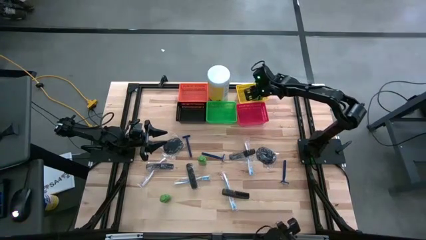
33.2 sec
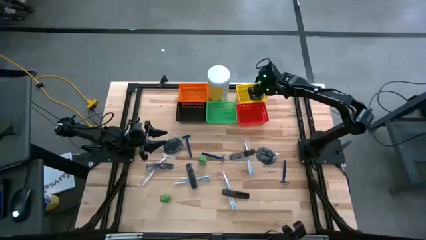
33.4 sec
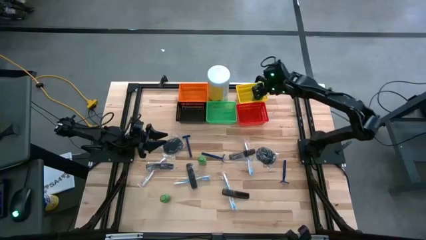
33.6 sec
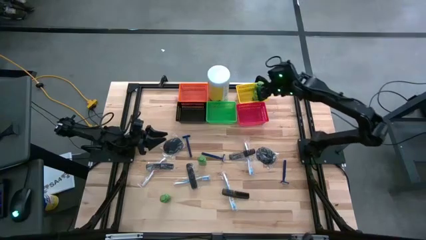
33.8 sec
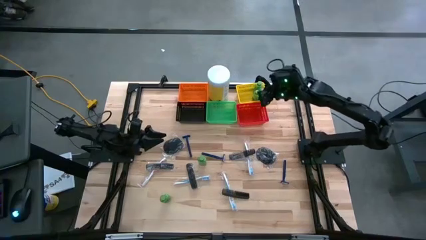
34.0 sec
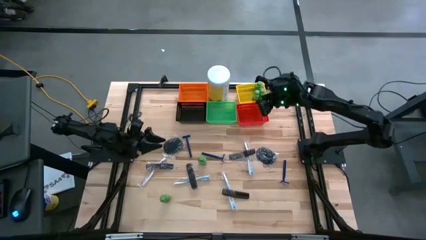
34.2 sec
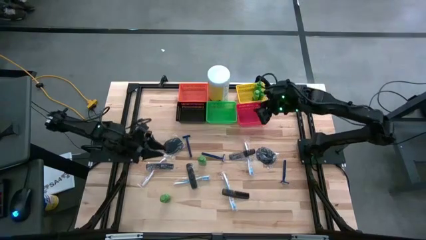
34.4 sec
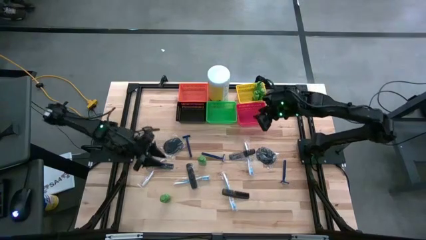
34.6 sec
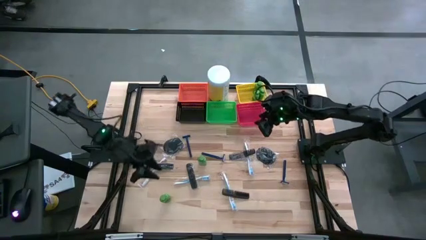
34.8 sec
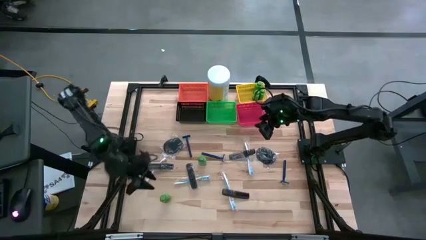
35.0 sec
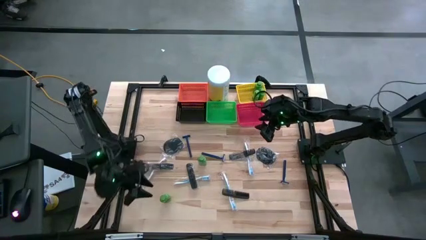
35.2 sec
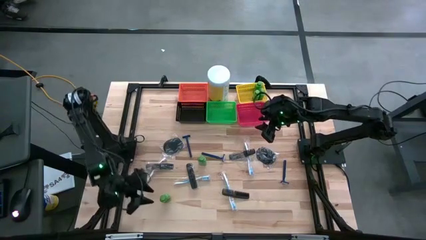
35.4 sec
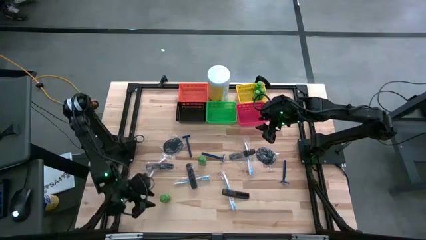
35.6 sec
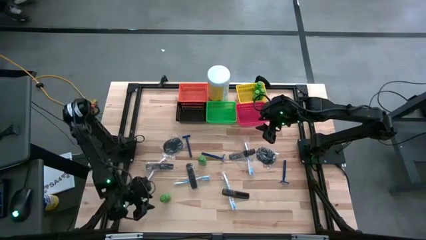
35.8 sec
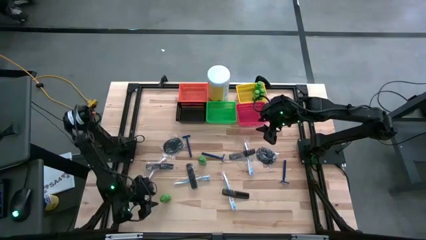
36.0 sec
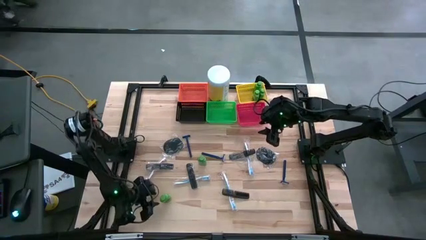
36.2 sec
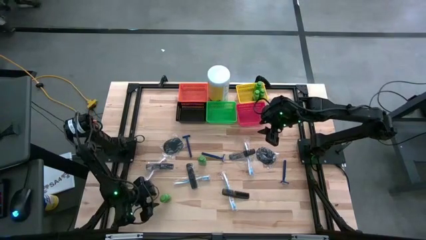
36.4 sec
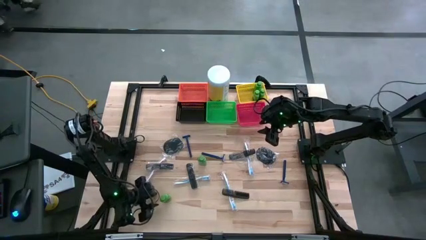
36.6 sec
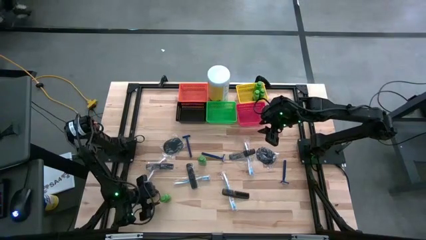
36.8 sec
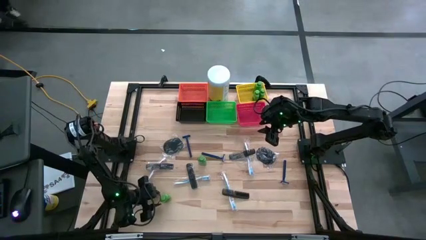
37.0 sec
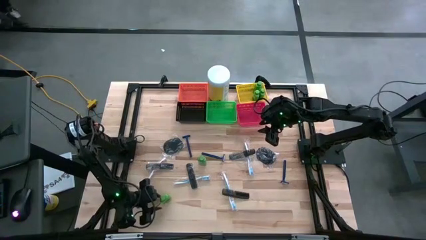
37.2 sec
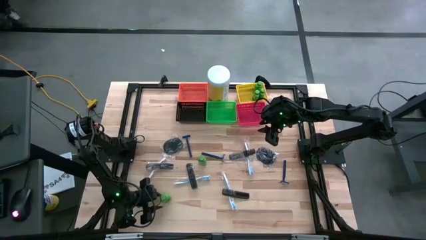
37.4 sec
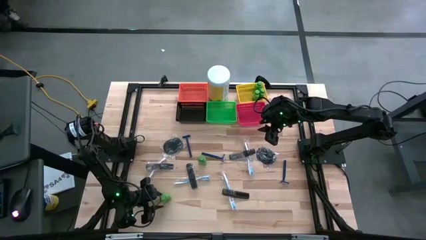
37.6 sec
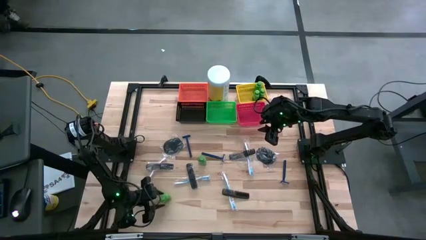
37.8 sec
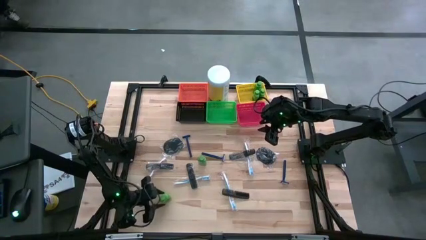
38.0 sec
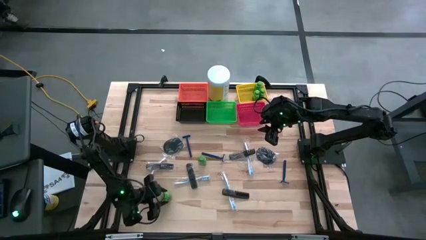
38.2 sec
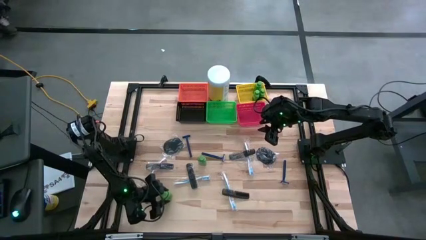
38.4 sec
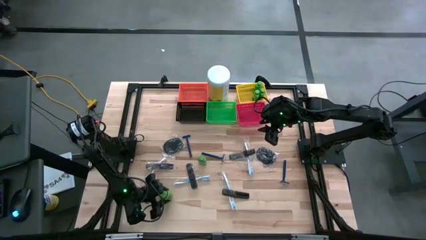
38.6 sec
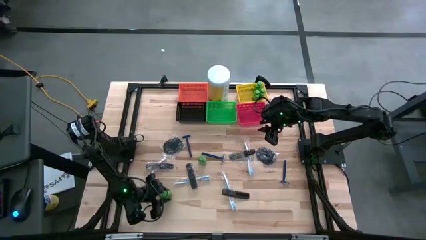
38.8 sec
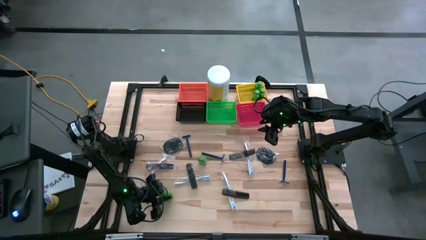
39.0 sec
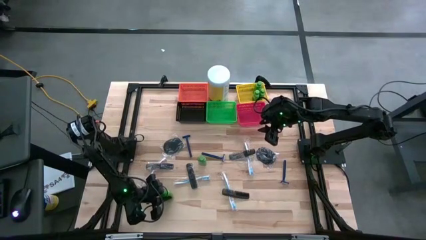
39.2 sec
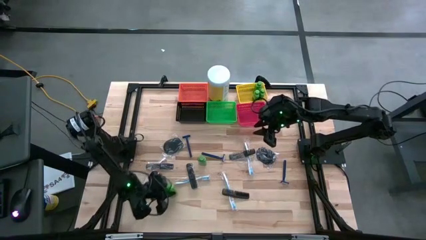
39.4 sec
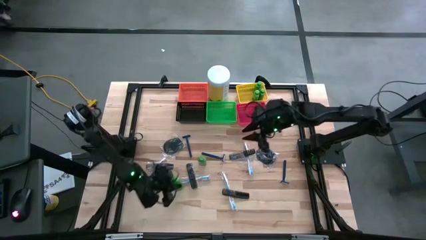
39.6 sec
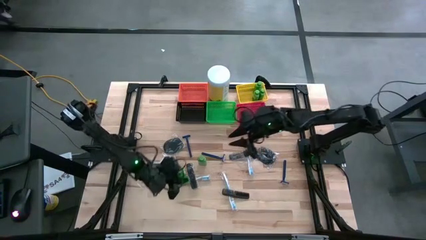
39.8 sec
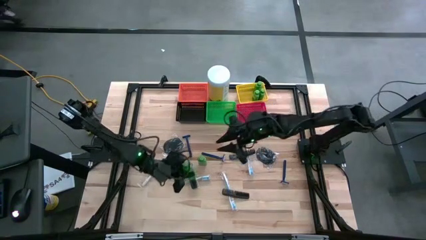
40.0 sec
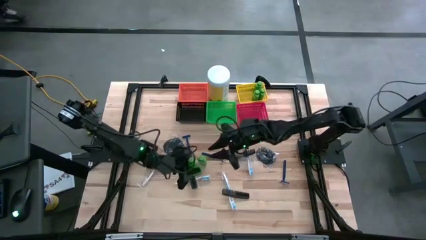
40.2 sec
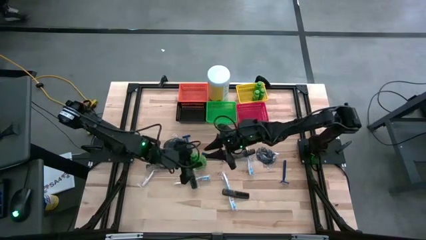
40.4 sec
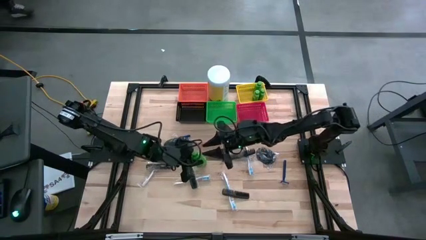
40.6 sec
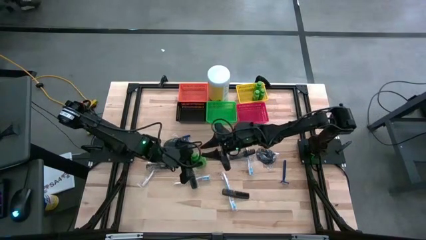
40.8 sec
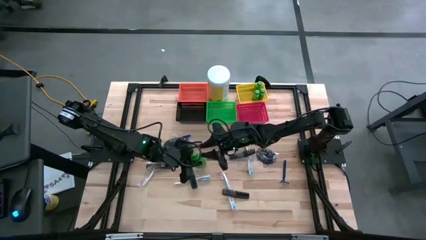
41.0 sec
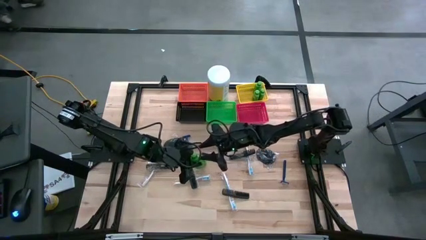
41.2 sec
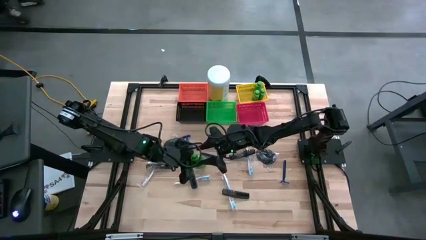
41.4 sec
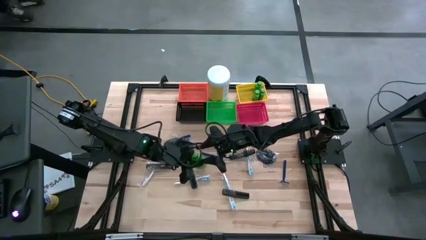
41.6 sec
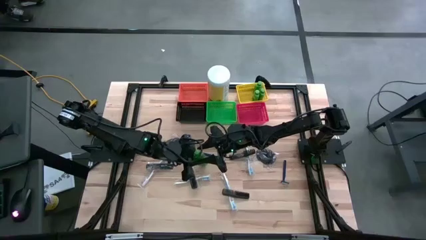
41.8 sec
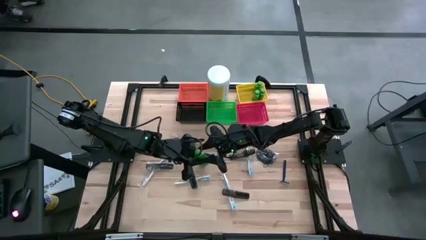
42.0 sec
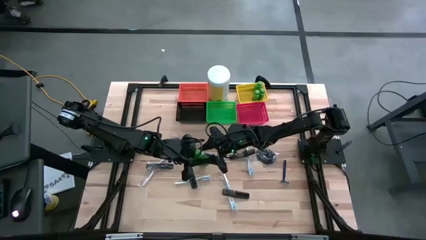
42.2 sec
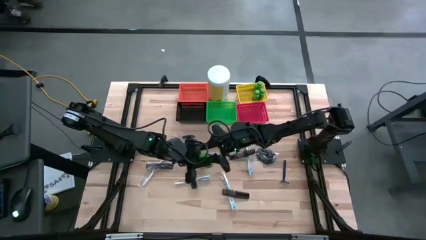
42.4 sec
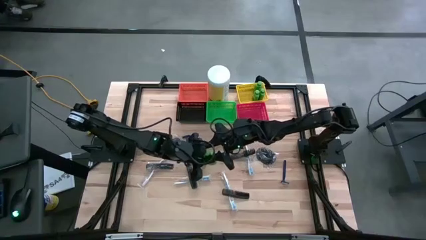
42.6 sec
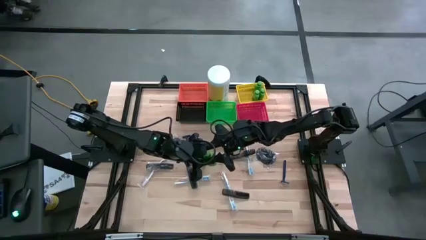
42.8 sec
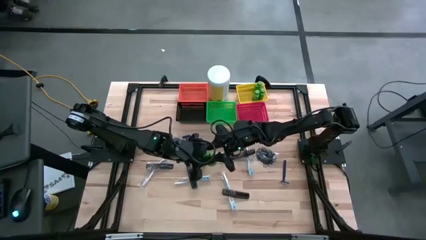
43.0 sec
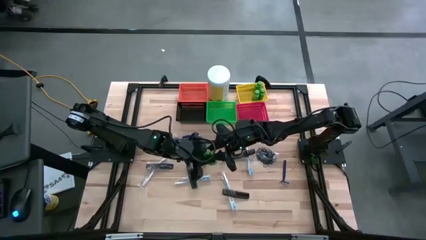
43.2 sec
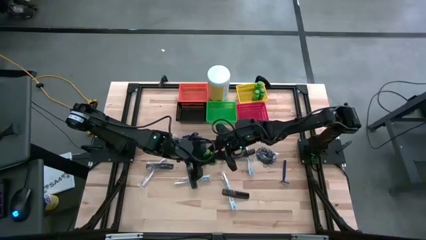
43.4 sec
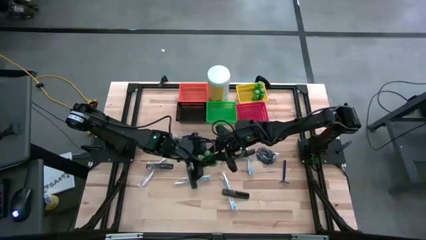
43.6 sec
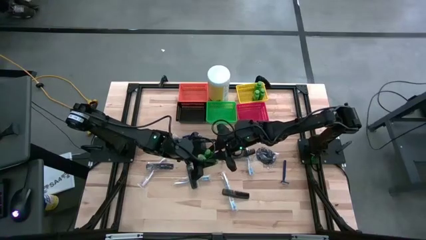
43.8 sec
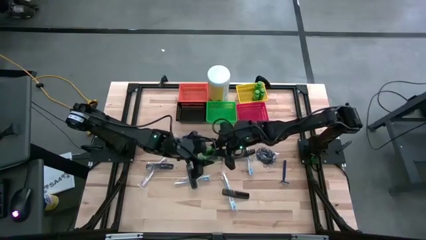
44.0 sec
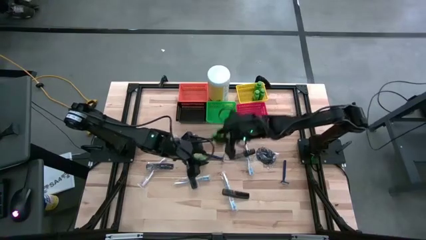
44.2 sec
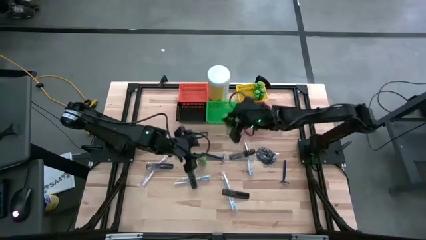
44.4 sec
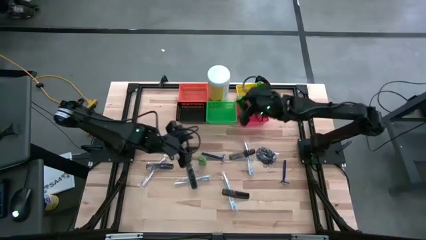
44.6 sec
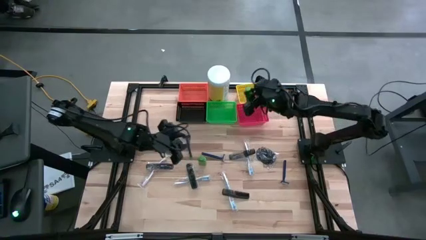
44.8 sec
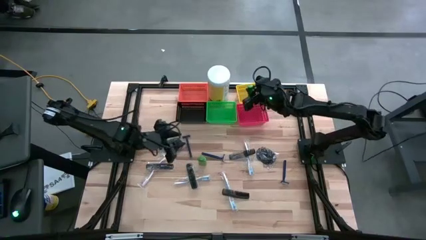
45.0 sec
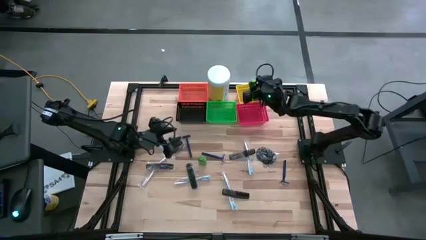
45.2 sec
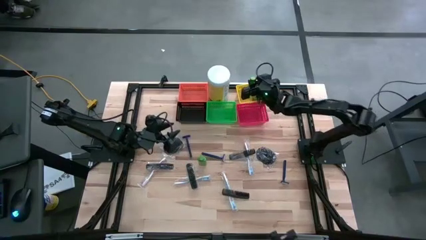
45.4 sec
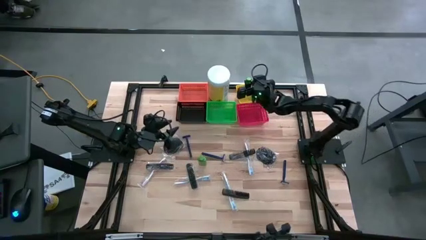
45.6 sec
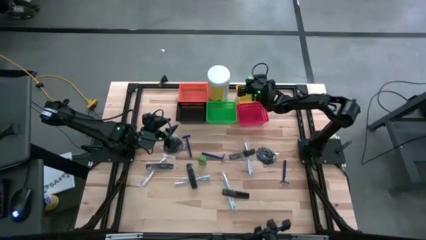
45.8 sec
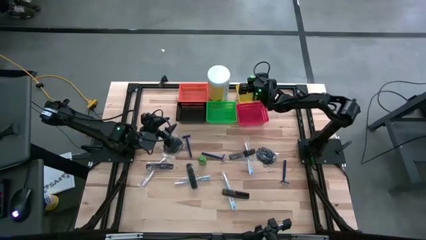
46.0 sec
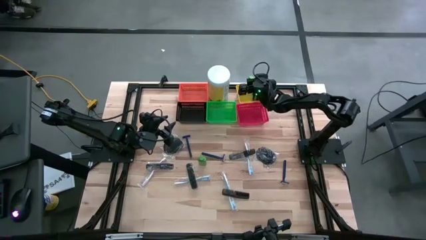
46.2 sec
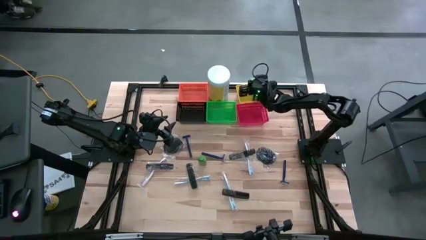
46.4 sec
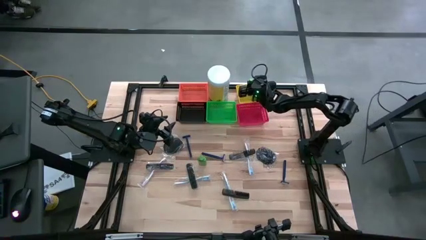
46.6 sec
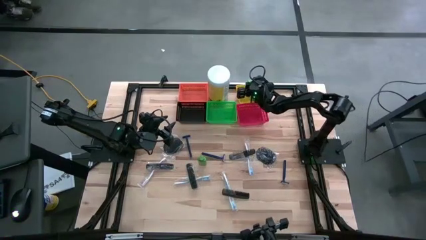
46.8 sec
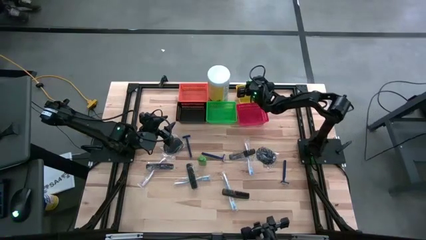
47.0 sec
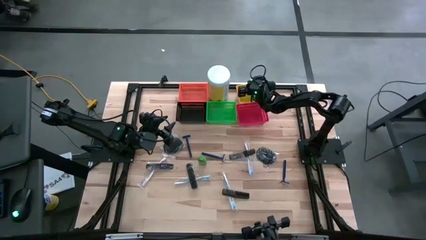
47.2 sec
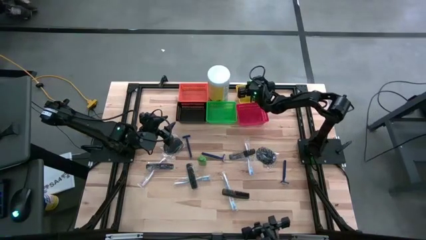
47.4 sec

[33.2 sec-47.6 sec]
Task: Pick & Place Travel size toiletries
Put the green shampoo into the yellow bin
